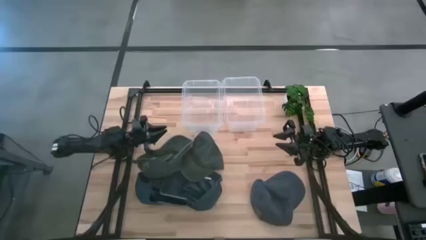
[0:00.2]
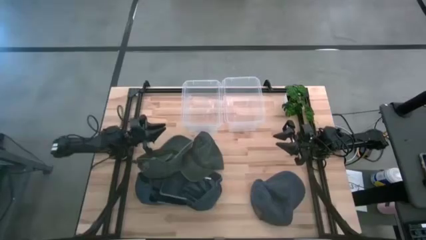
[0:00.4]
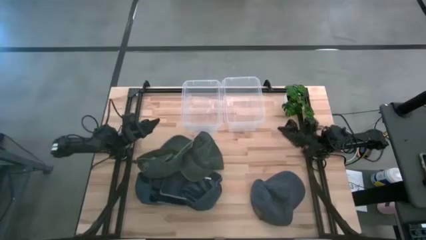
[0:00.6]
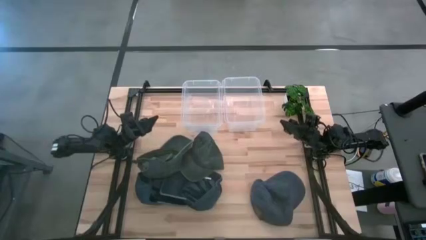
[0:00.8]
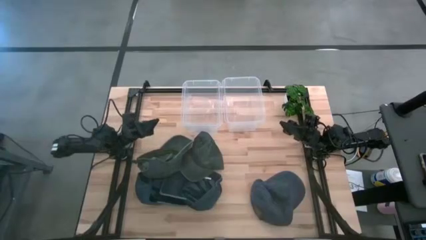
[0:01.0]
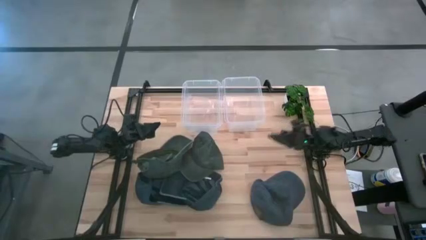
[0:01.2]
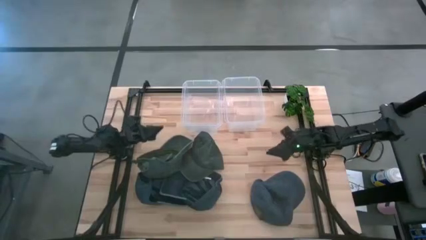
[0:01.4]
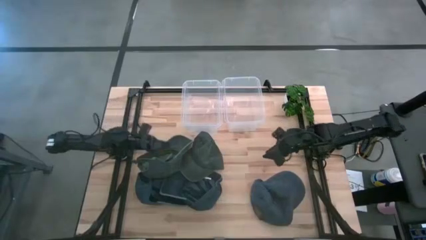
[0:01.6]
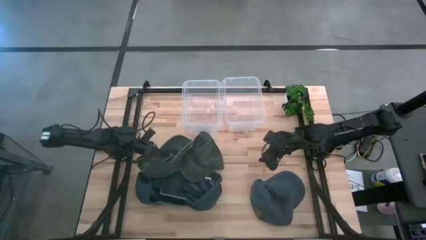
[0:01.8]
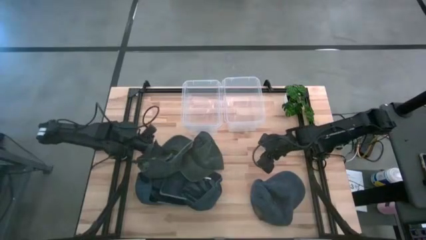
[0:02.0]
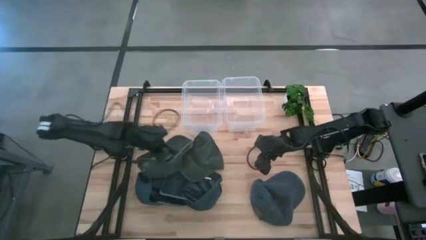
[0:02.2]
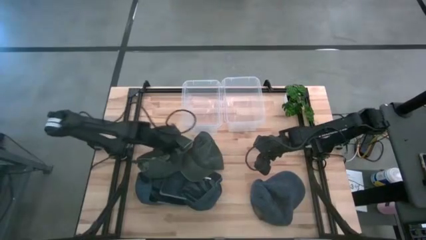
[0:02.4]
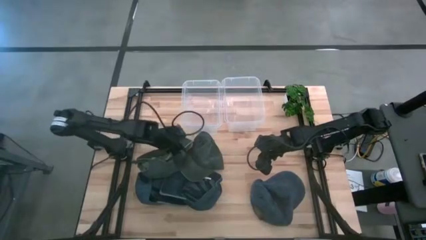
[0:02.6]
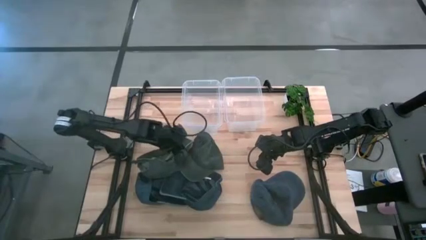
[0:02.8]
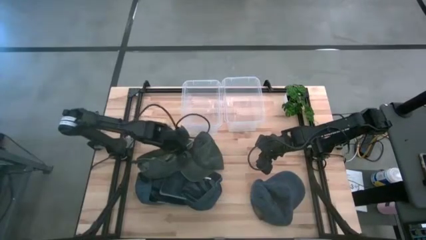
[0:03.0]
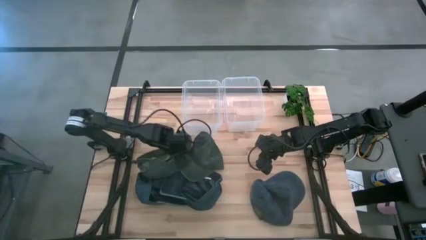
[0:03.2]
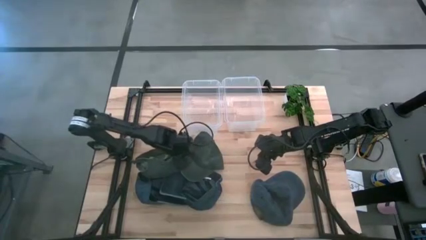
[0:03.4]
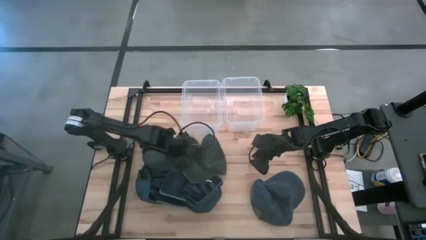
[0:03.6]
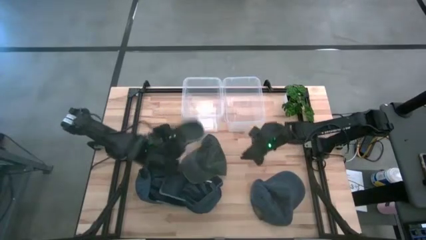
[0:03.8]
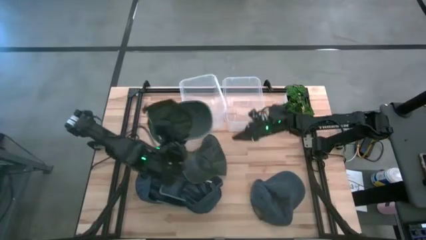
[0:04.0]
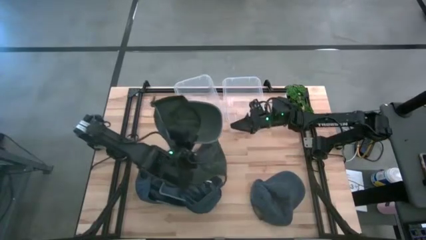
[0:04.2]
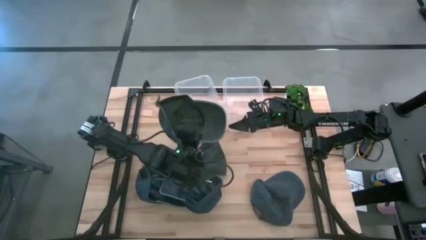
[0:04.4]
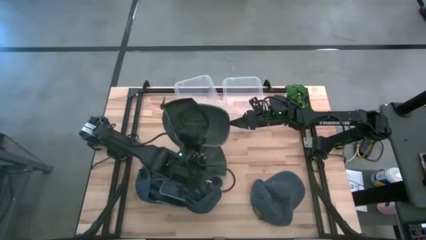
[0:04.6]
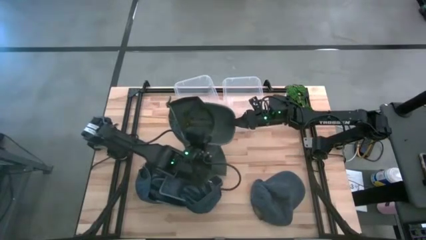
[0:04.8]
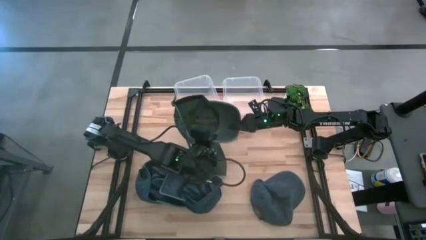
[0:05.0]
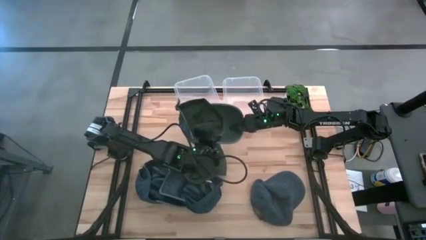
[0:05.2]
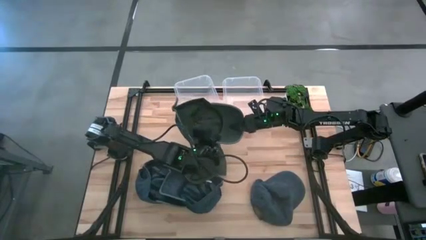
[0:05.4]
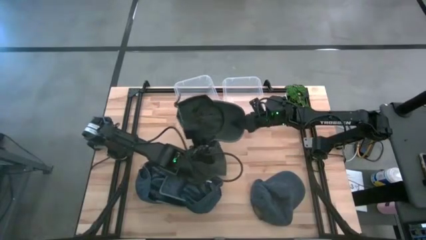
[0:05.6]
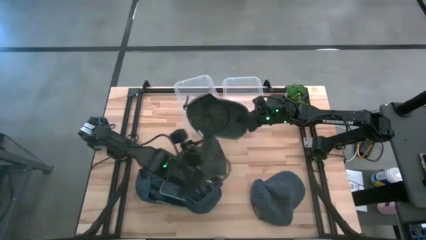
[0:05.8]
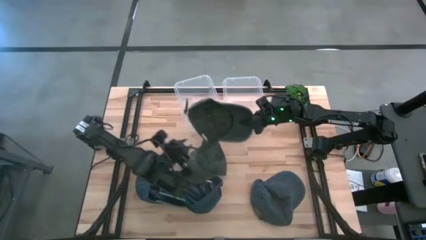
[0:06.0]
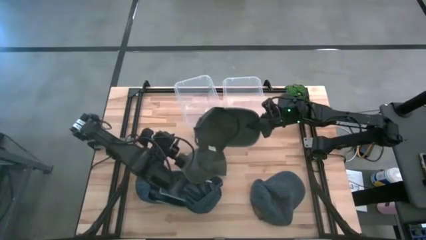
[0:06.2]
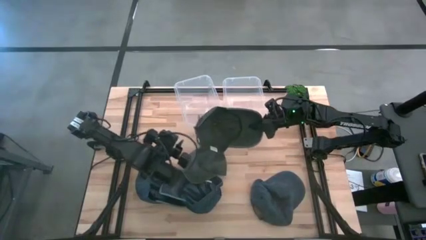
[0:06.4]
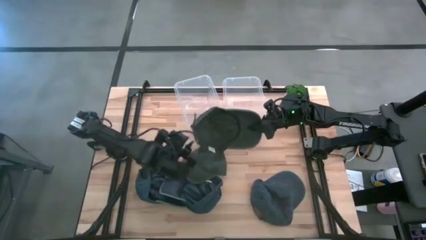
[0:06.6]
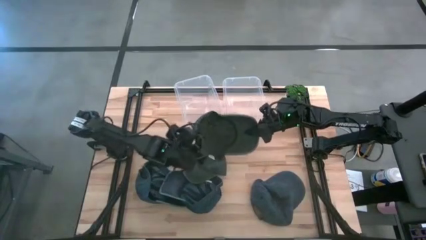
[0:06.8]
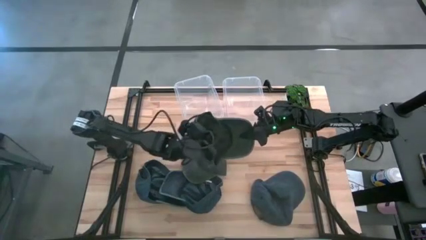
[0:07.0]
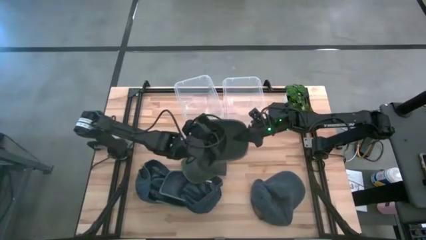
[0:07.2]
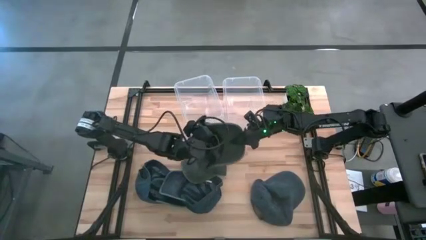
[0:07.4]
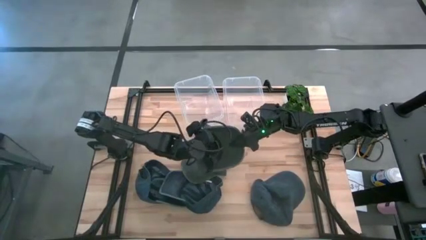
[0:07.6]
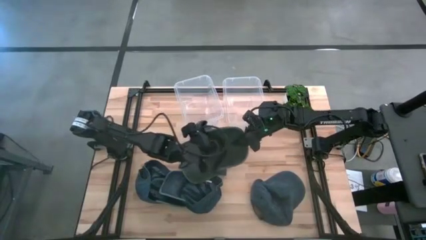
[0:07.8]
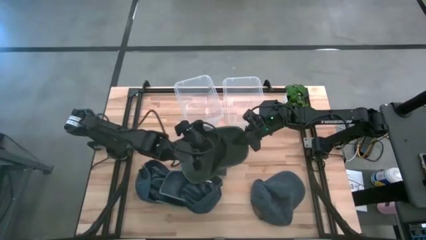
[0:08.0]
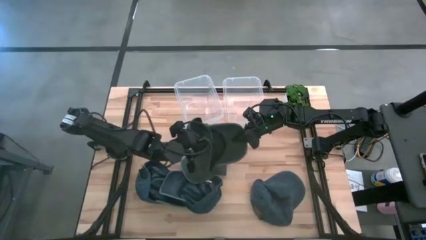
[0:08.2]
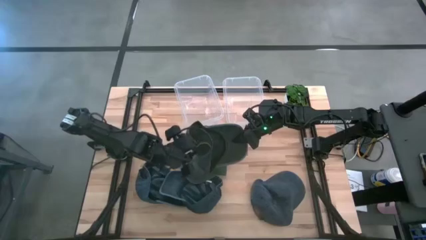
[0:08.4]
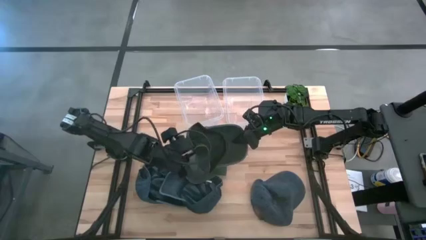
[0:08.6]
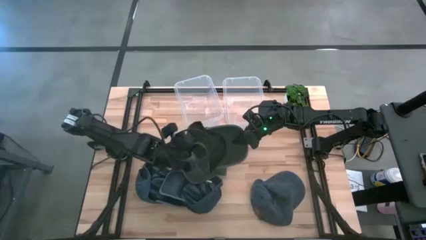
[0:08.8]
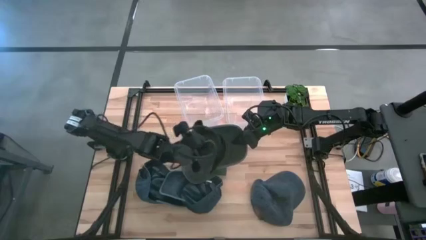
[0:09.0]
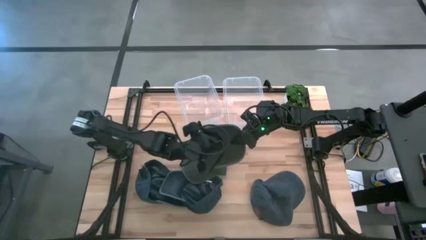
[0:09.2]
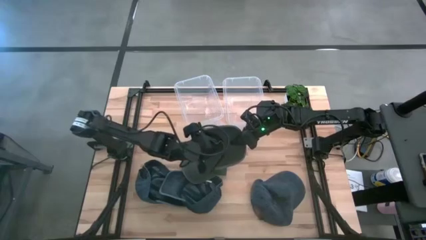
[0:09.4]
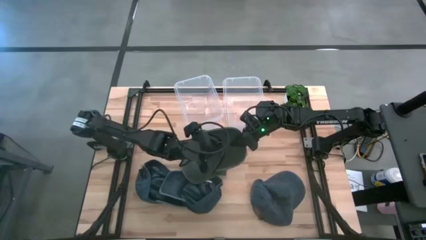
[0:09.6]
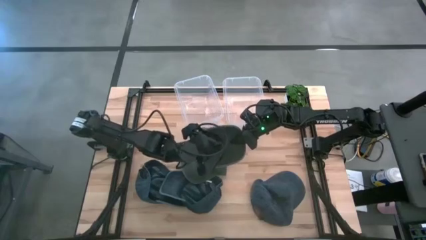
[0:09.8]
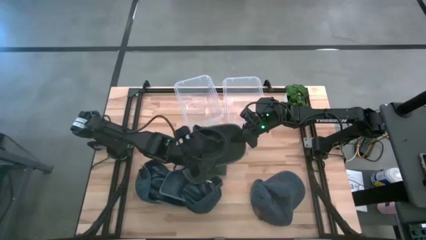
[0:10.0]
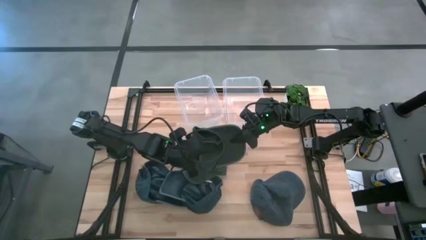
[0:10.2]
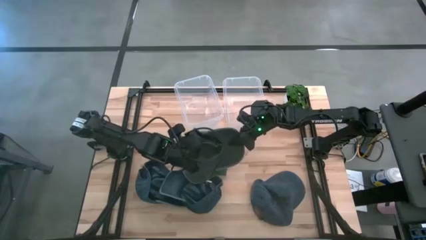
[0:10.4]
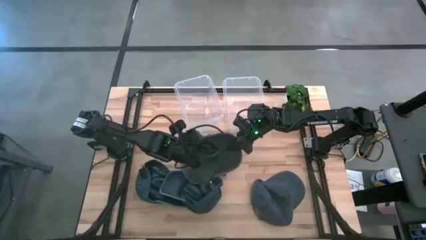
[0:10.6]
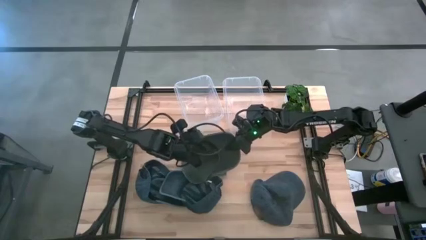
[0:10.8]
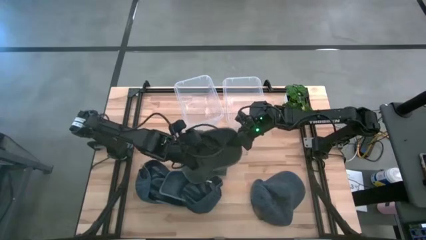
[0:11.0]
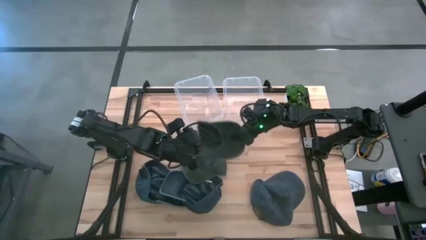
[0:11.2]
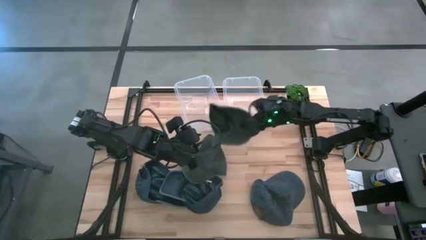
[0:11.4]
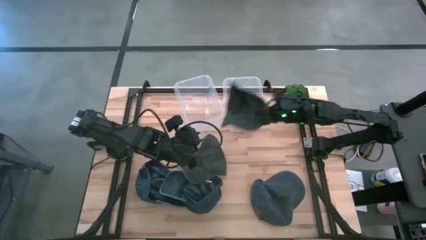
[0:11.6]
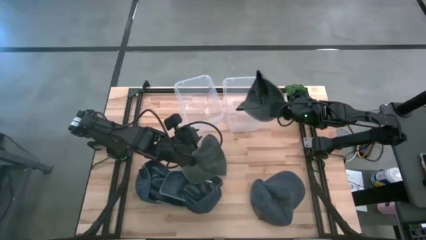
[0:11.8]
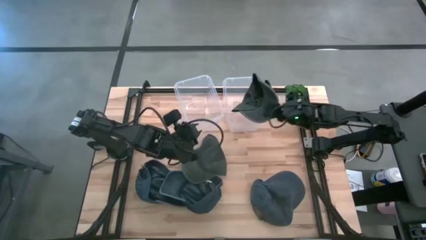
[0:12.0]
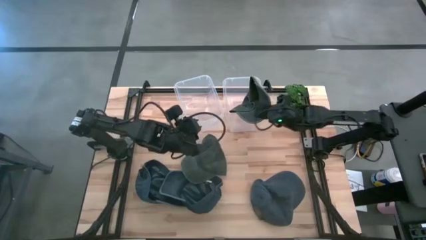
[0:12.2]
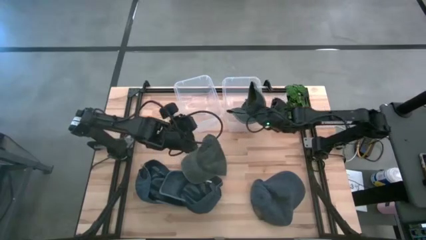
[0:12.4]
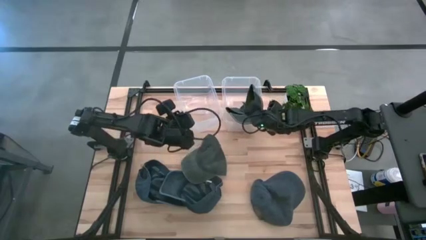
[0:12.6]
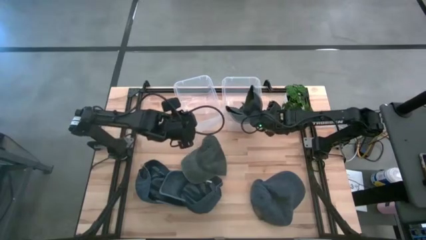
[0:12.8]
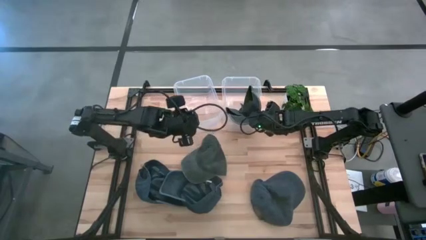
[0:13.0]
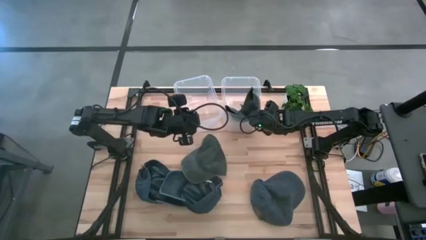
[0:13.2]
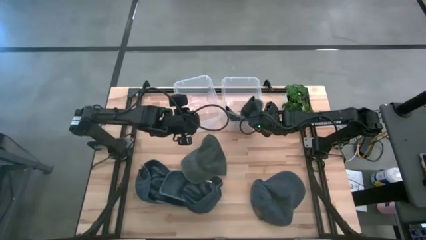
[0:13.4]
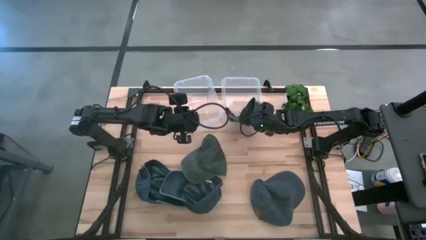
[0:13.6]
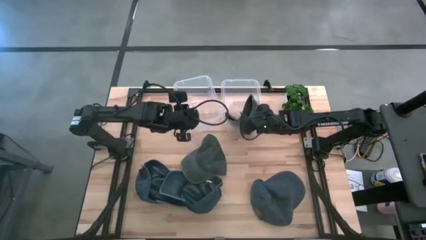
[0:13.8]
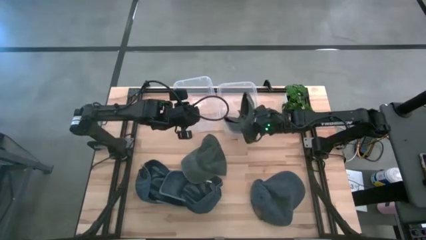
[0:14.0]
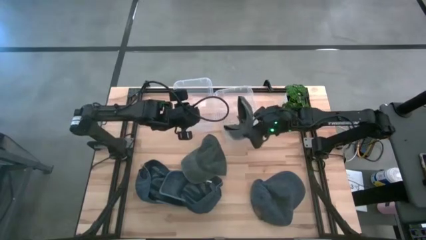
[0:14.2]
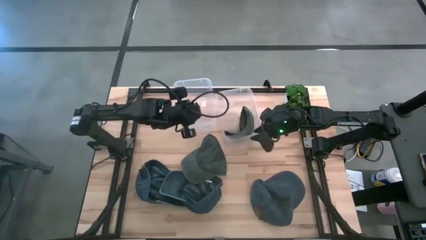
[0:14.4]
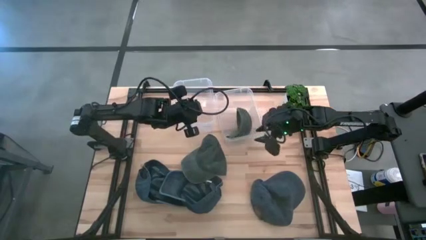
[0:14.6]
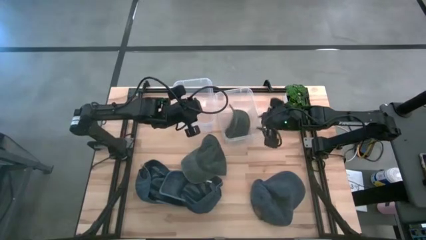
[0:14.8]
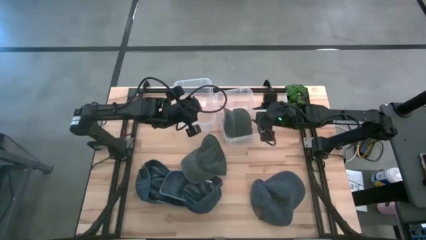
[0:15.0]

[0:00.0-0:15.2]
Task: Pick & Place hat
Put the left gray cap into the right bin
